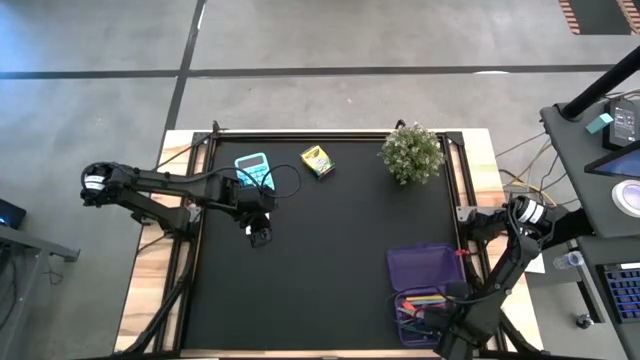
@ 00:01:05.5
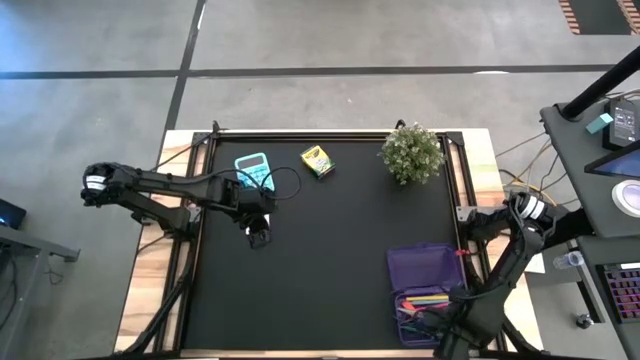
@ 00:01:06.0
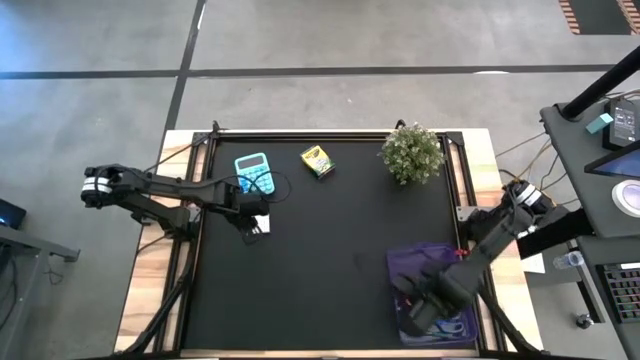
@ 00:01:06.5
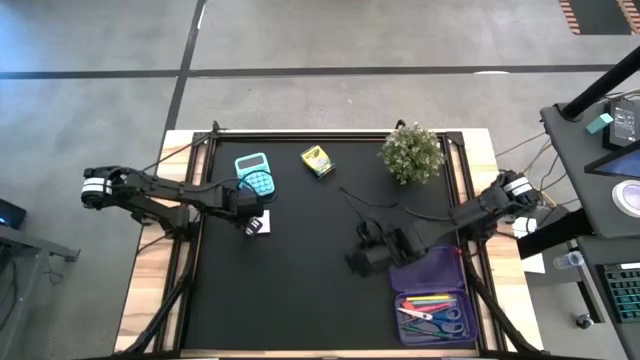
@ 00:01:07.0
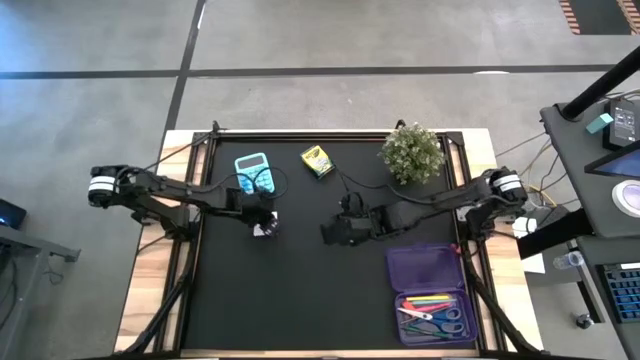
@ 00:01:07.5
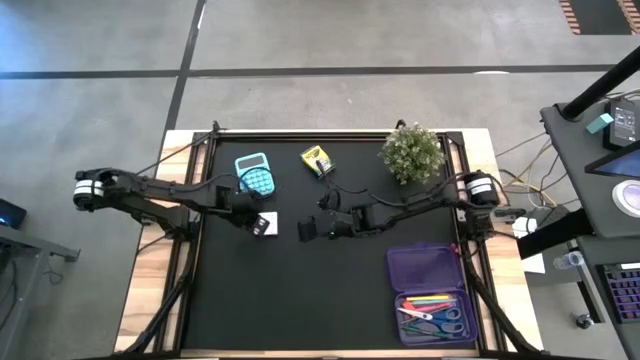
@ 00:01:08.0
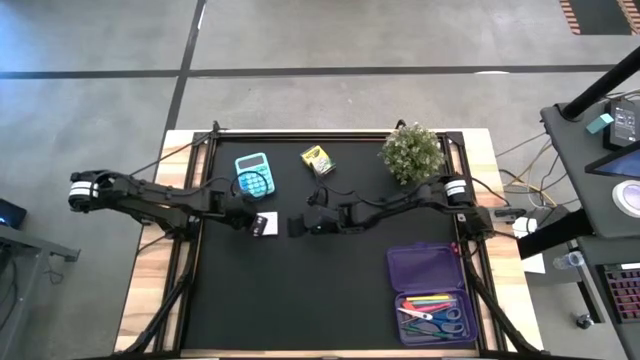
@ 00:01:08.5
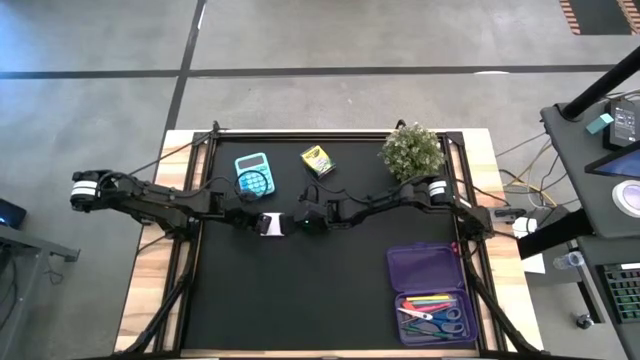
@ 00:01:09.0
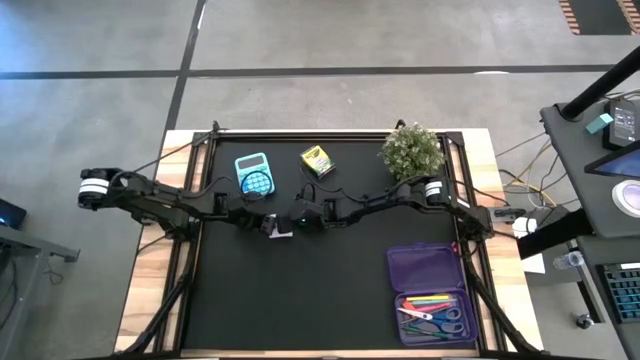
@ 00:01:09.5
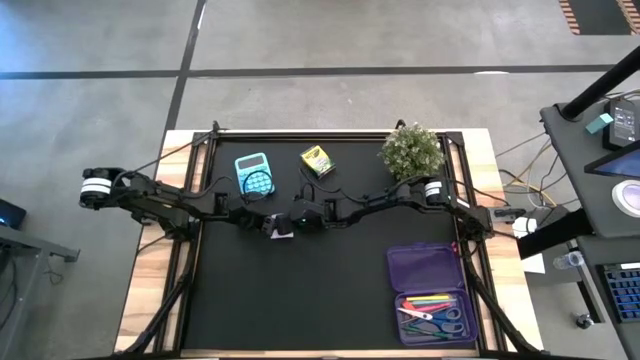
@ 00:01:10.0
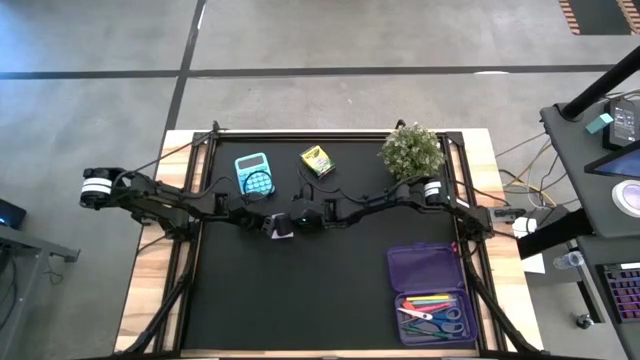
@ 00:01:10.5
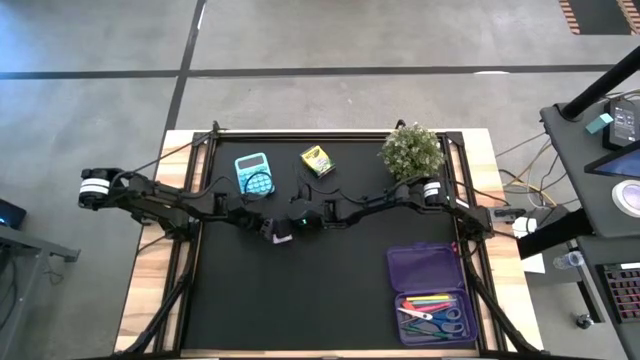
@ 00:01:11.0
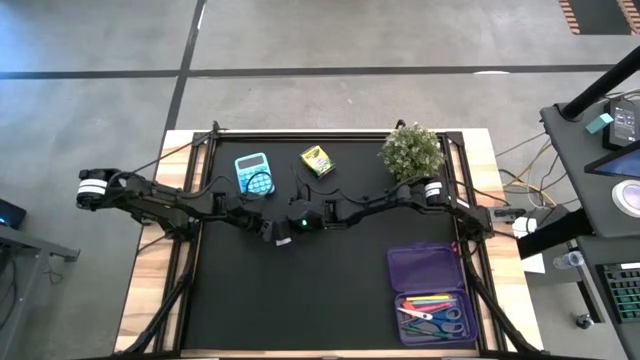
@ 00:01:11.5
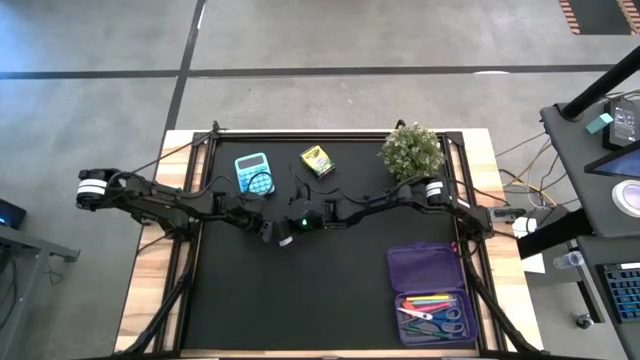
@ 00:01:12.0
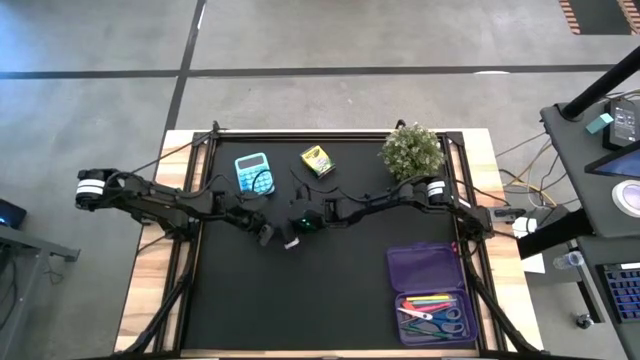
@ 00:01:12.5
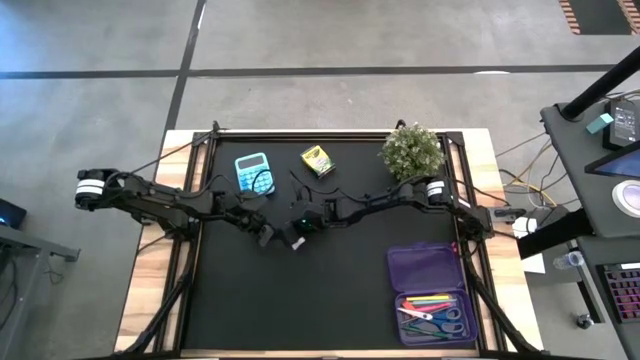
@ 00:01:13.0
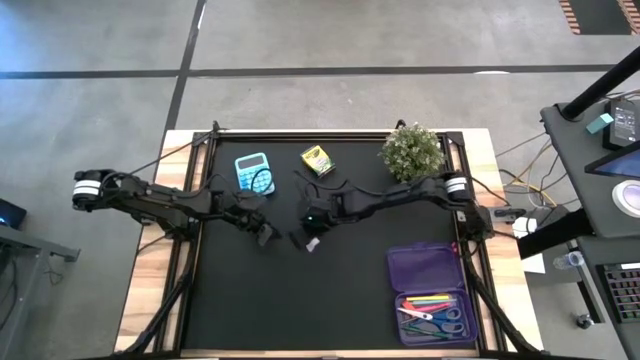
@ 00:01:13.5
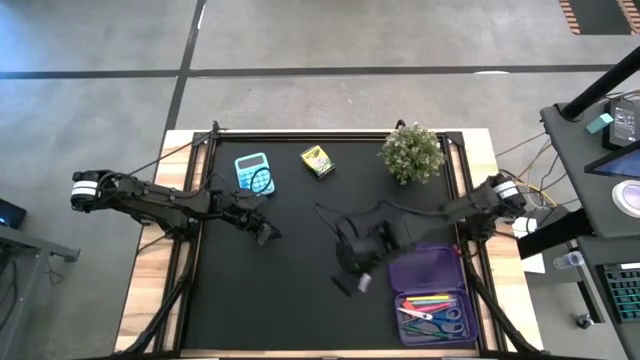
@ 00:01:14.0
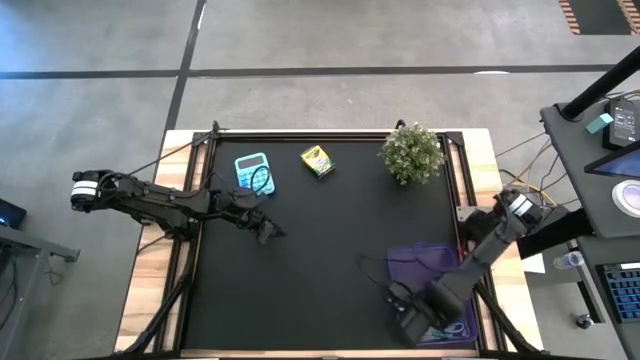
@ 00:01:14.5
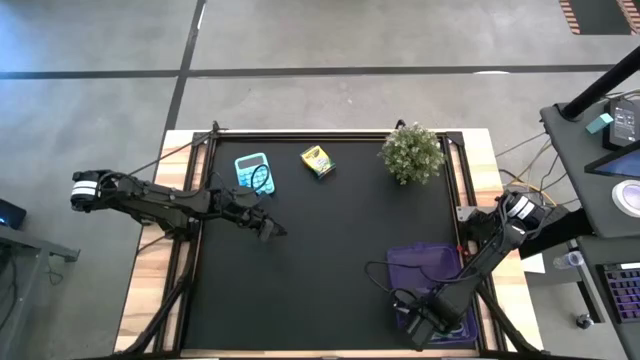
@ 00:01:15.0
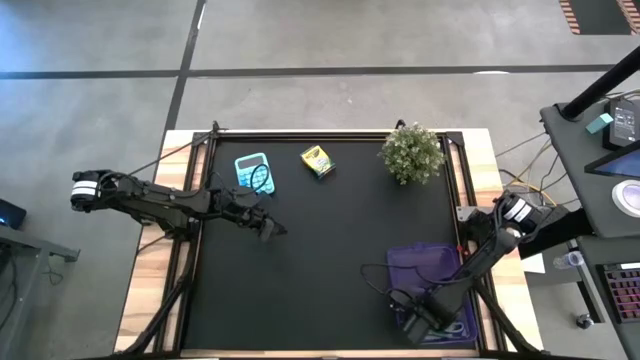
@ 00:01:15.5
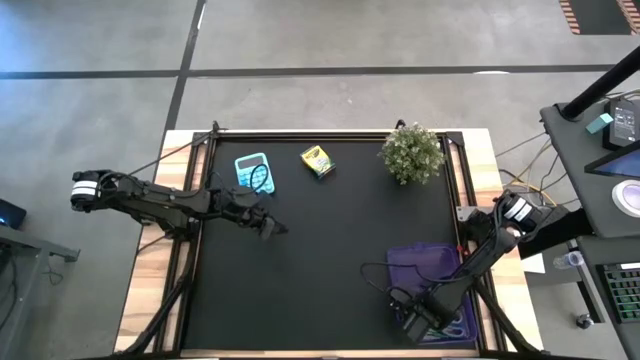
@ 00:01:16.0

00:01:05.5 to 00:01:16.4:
Task: Pack school essentials
Put the white sticky notes into the supply box

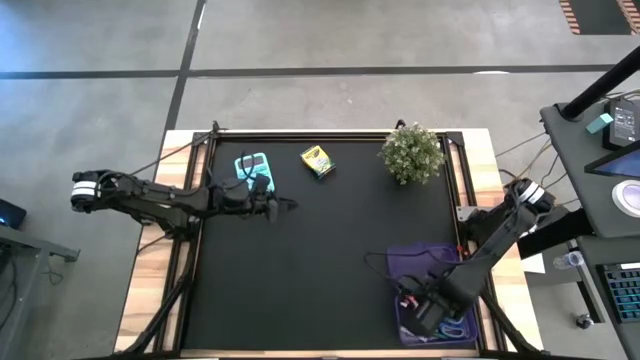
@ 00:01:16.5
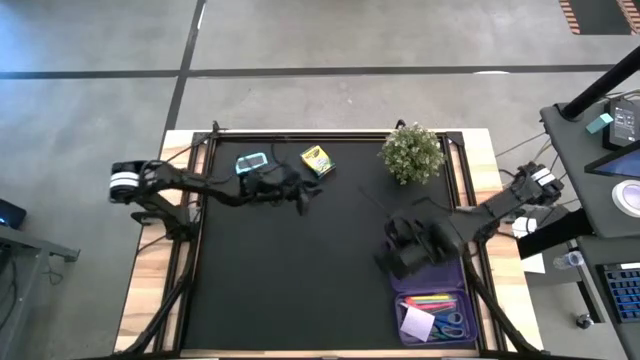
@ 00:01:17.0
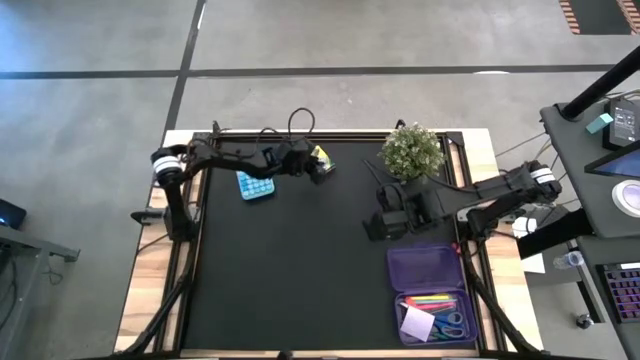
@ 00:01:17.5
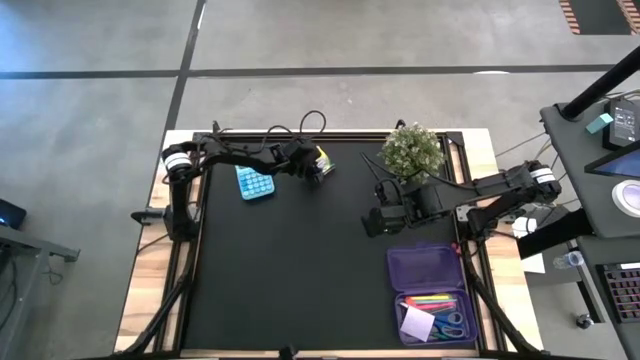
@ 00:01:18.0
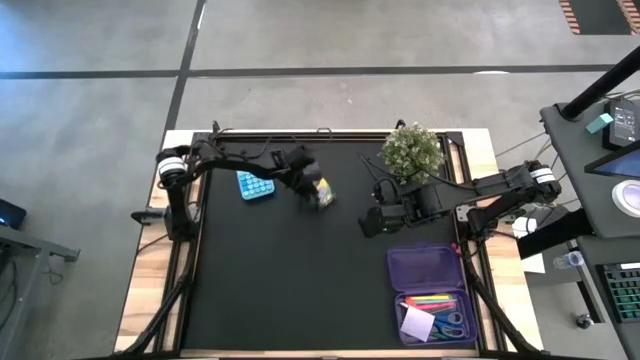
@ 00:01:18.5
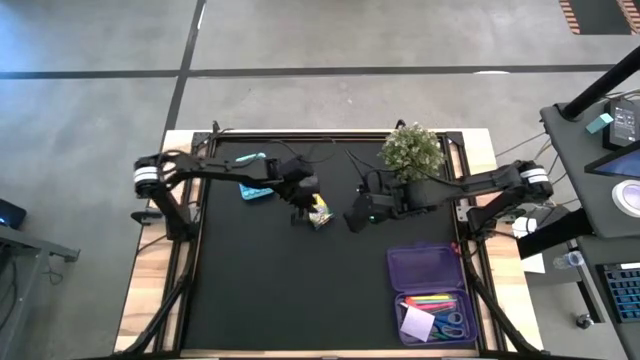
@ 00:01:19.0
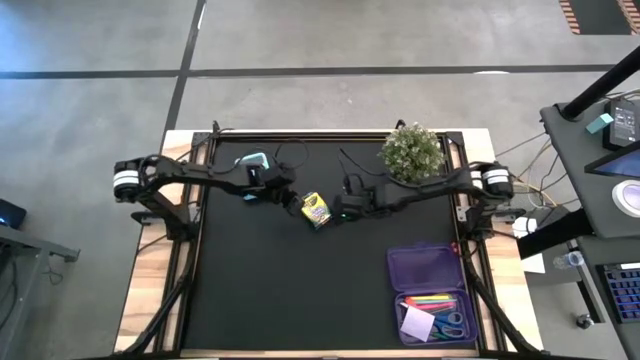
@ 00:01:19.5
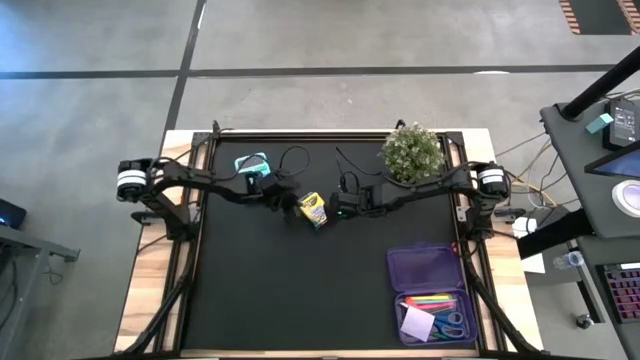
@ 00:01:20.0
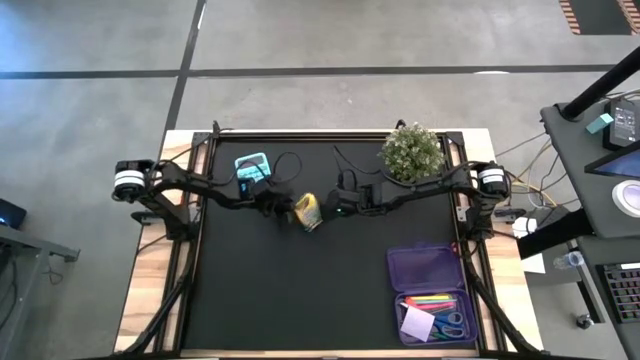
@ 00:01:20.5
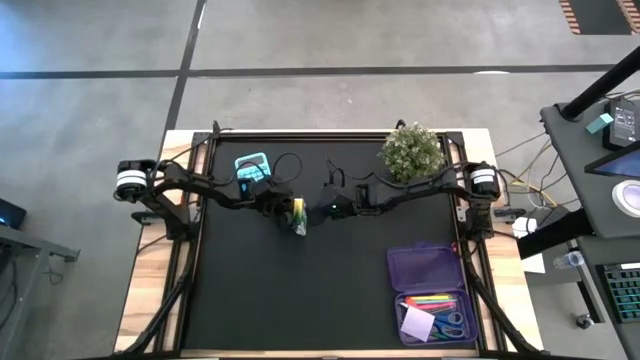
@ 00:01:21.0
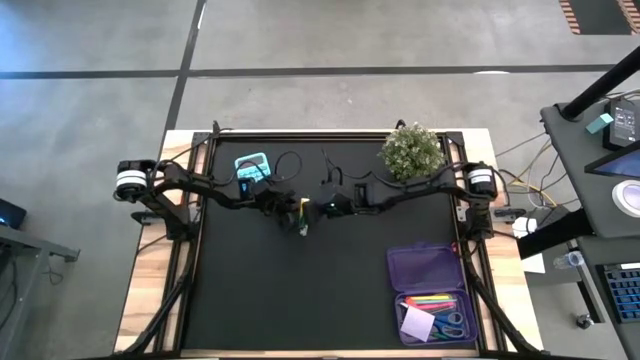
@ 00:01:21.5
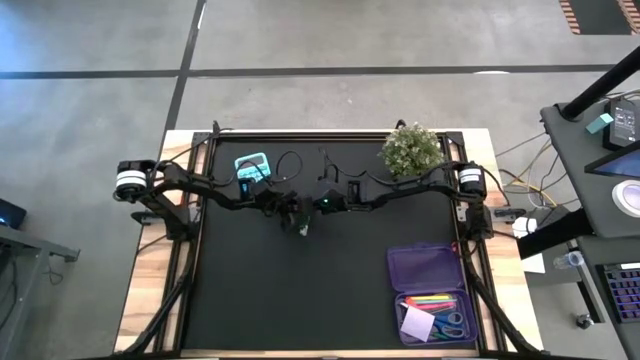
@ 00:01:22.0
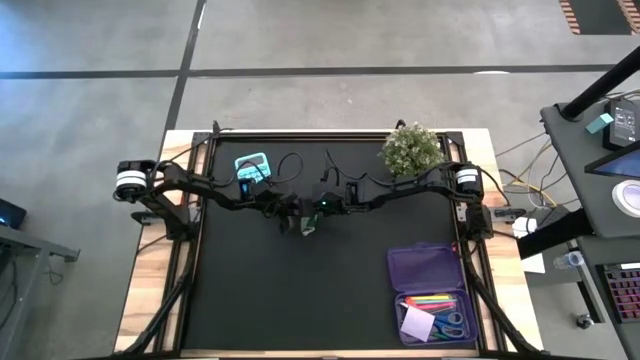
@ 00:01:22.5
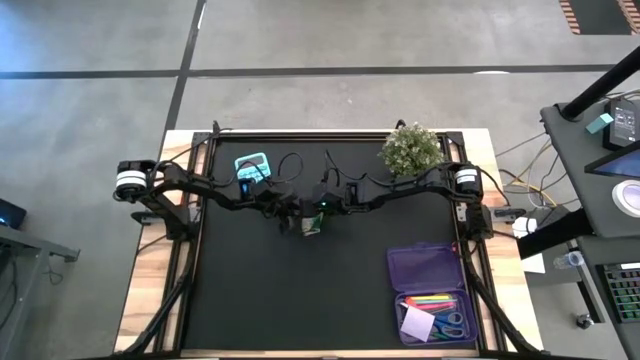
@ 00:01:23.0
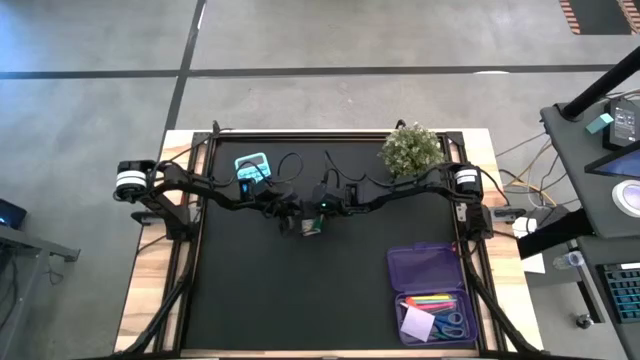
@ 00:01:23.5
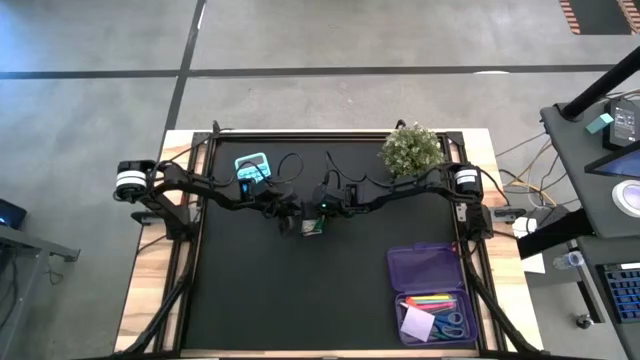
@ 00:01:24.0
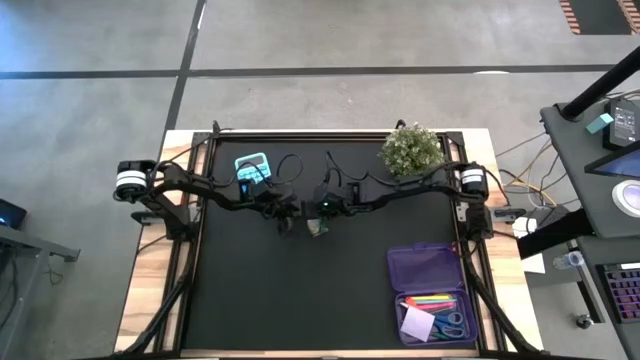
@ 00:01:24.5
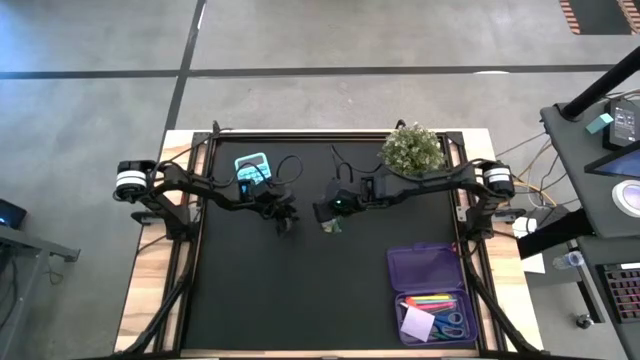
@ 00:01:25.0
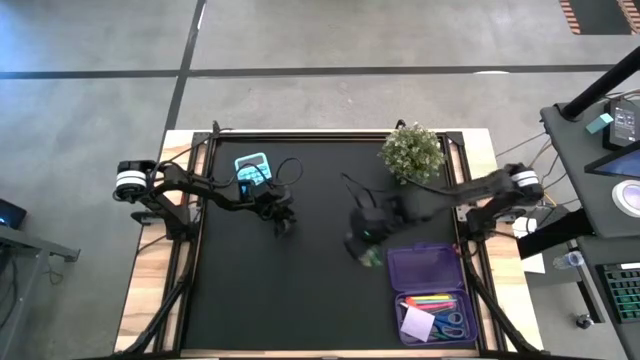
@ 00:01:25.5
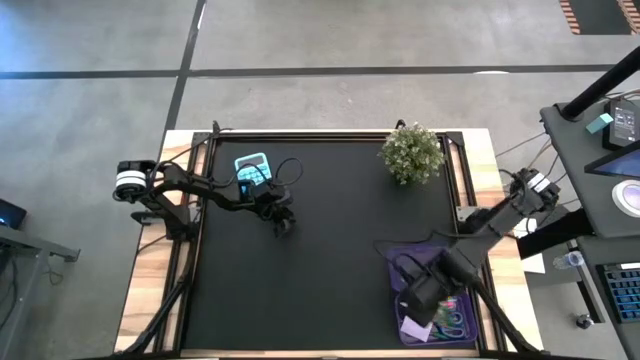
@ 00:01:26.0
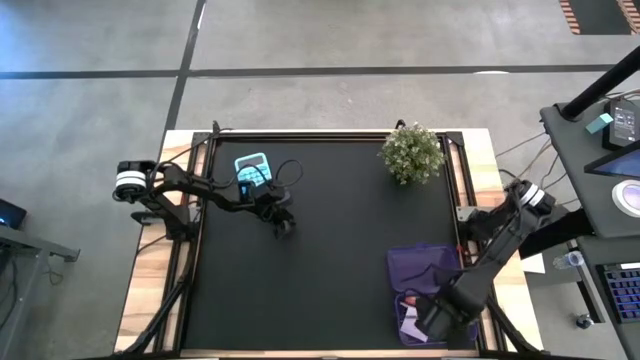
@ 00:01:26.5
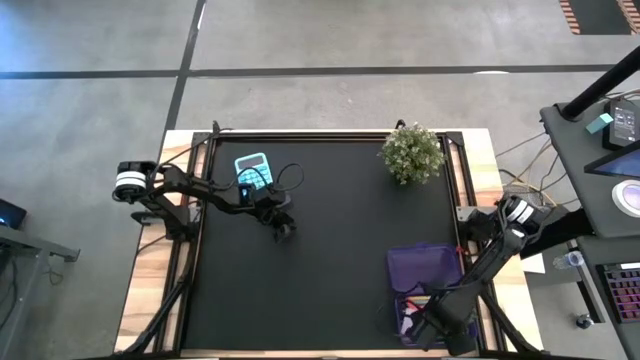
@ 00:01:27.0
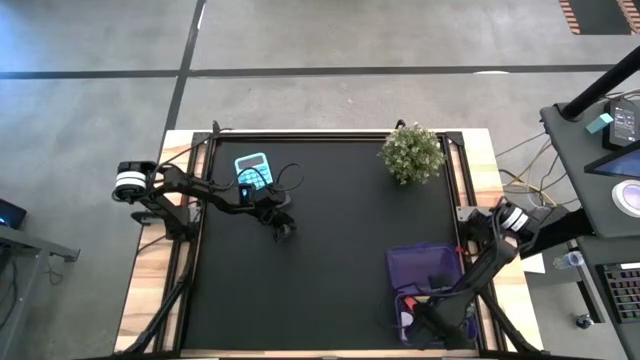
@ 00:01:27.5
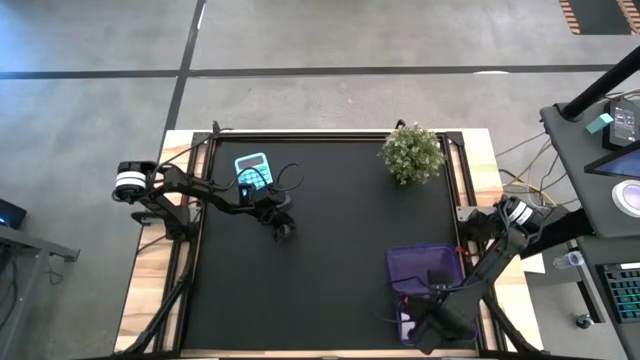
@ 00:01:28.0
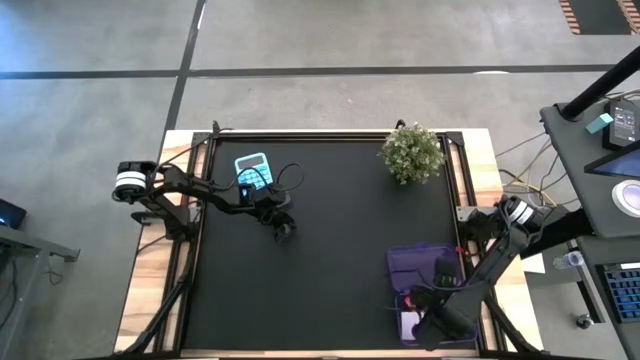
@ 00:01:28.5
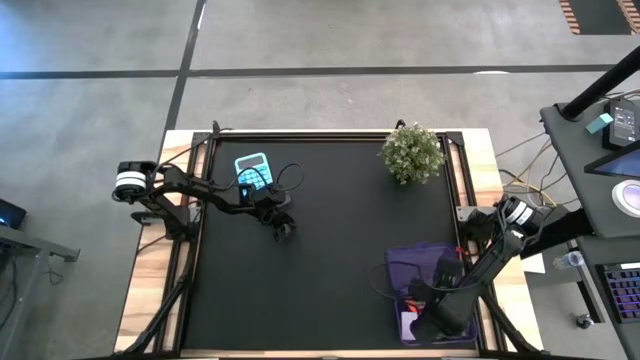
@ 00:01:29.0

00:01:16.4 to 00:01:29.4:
Put the crayon box into the supply box
